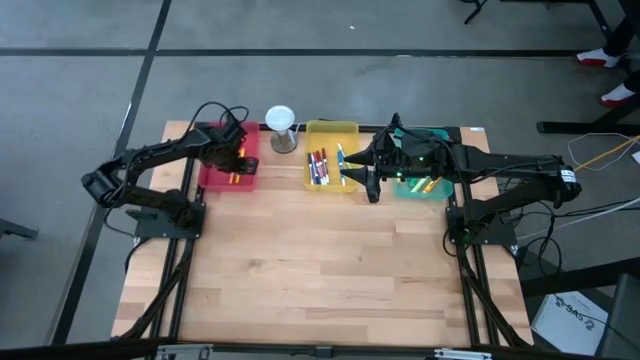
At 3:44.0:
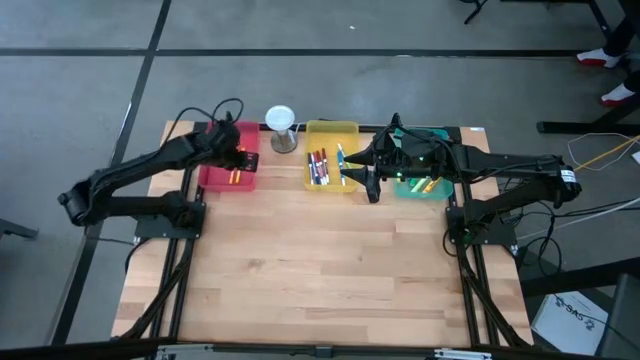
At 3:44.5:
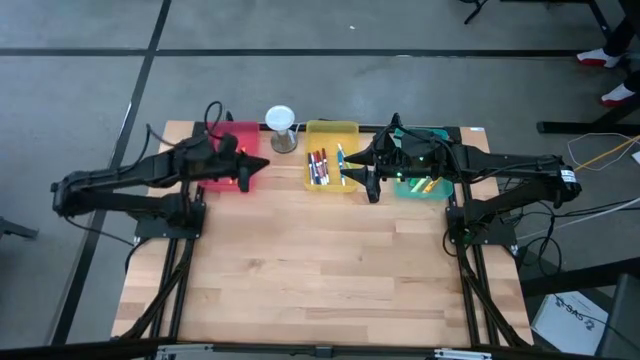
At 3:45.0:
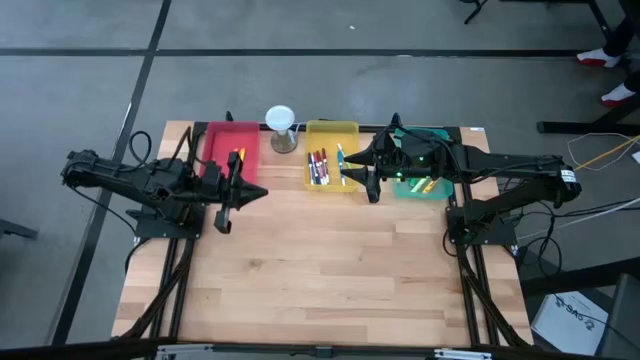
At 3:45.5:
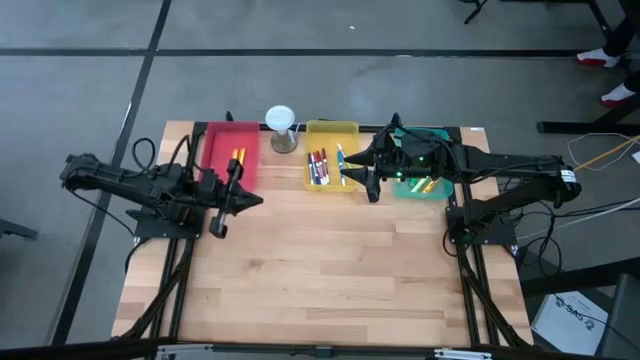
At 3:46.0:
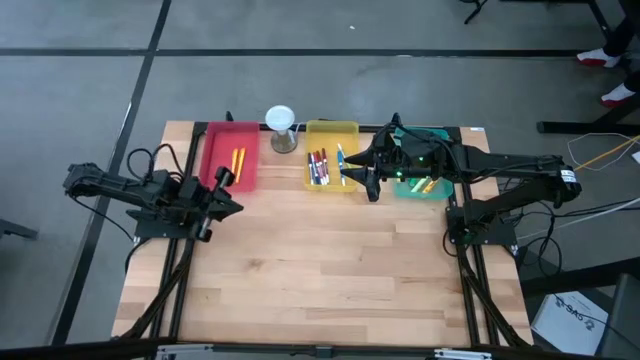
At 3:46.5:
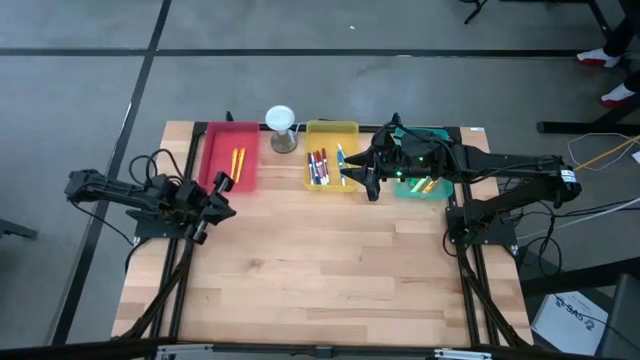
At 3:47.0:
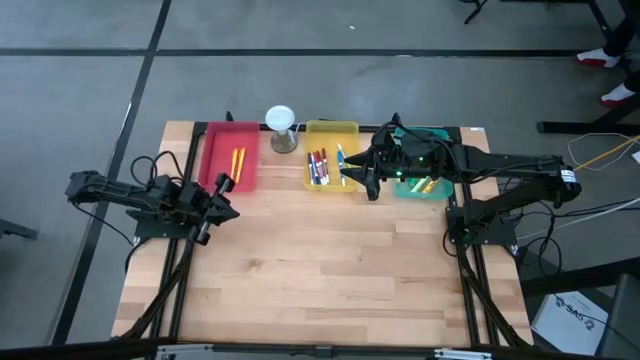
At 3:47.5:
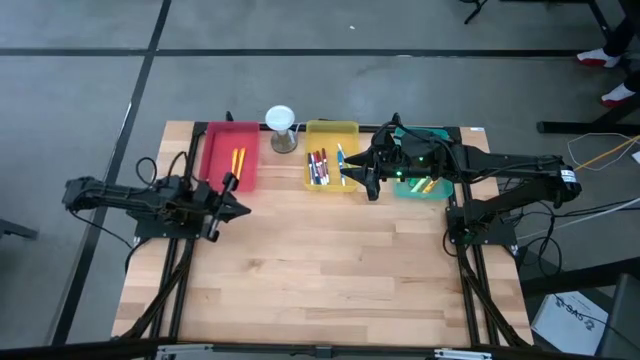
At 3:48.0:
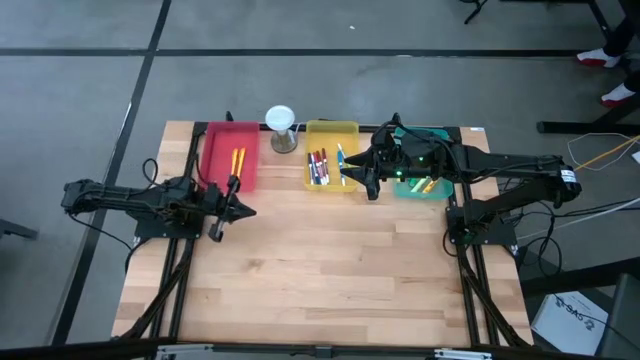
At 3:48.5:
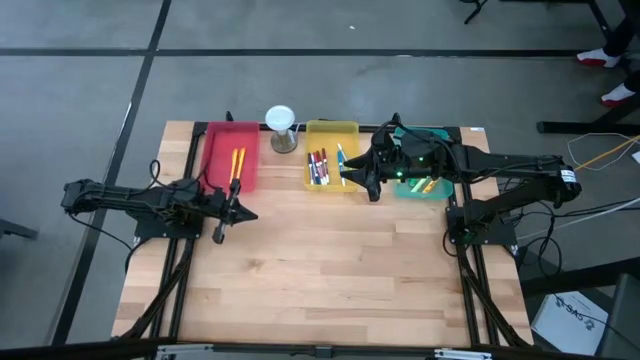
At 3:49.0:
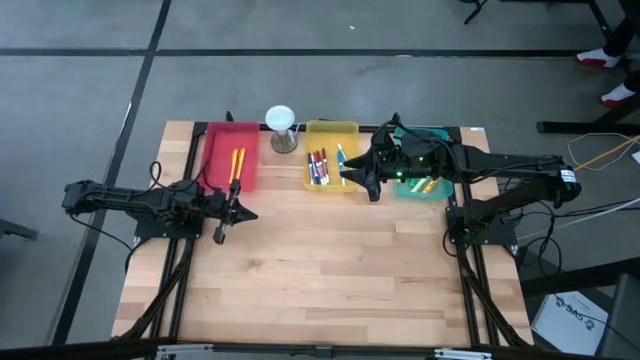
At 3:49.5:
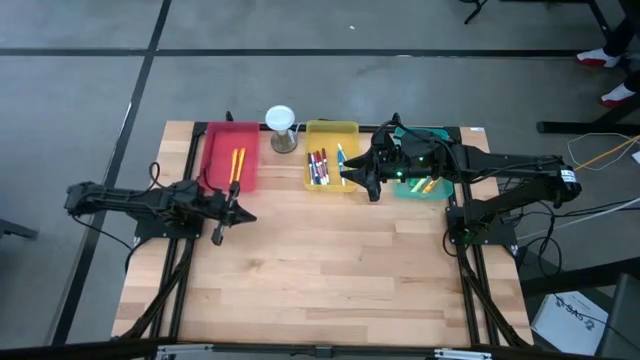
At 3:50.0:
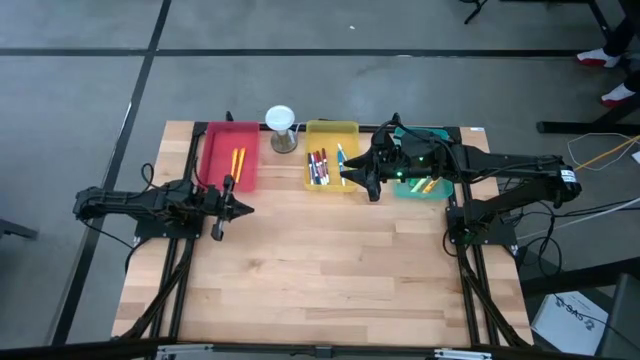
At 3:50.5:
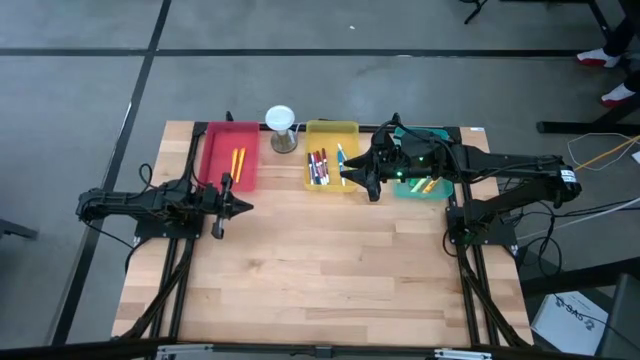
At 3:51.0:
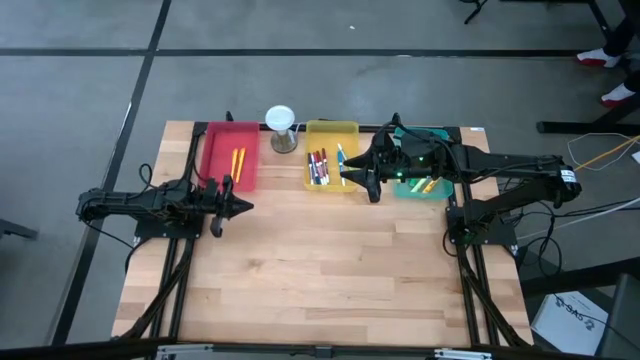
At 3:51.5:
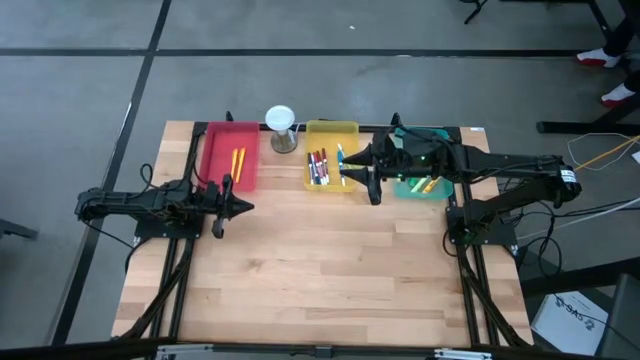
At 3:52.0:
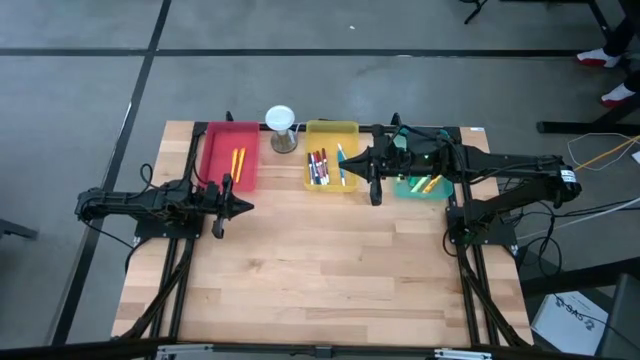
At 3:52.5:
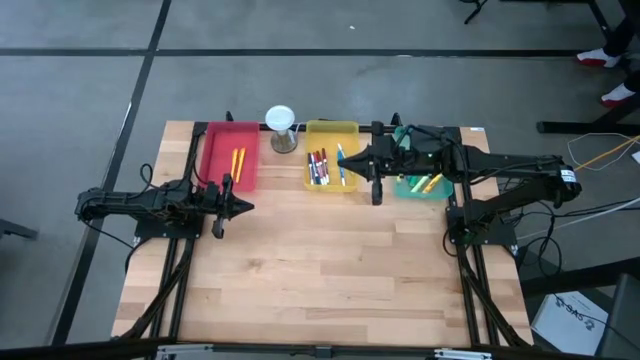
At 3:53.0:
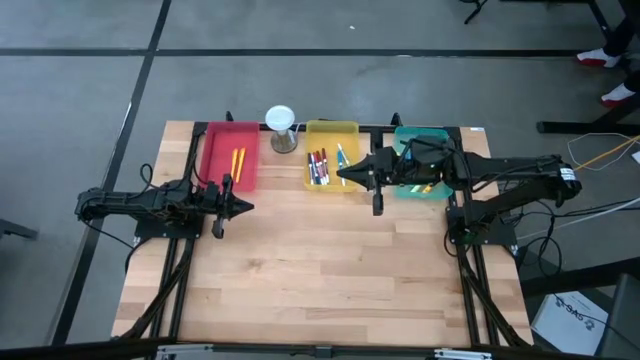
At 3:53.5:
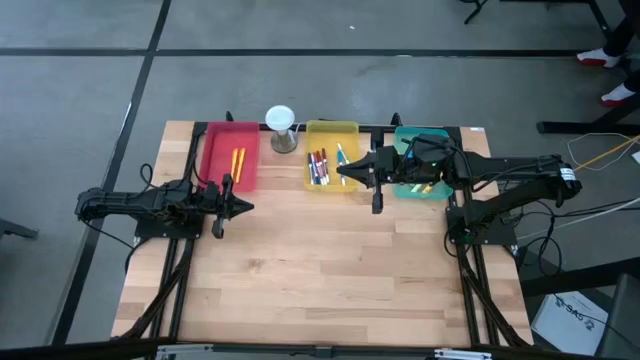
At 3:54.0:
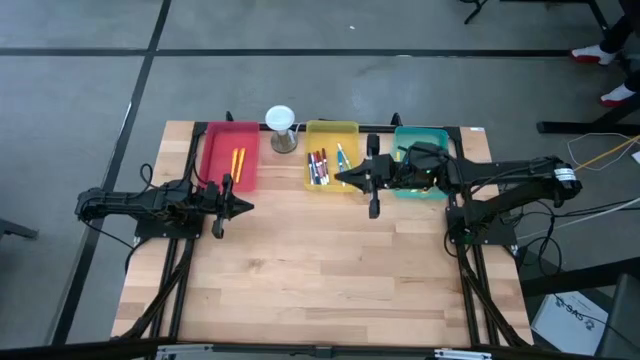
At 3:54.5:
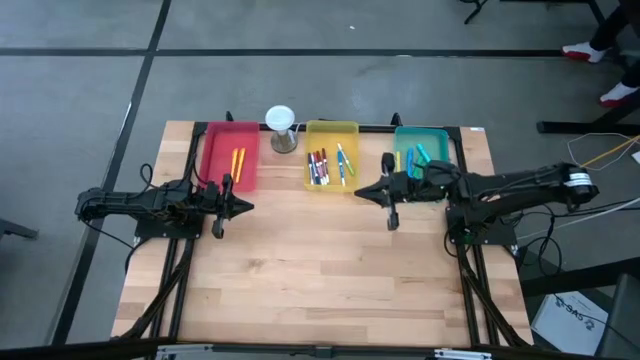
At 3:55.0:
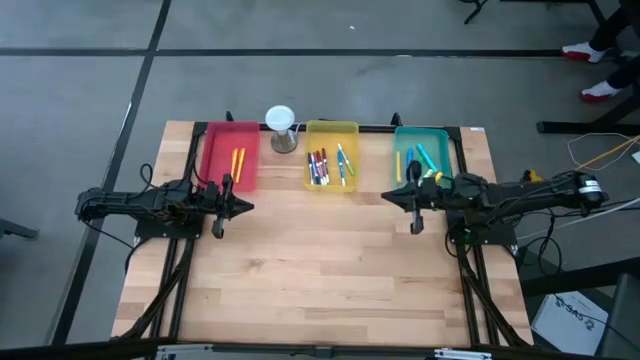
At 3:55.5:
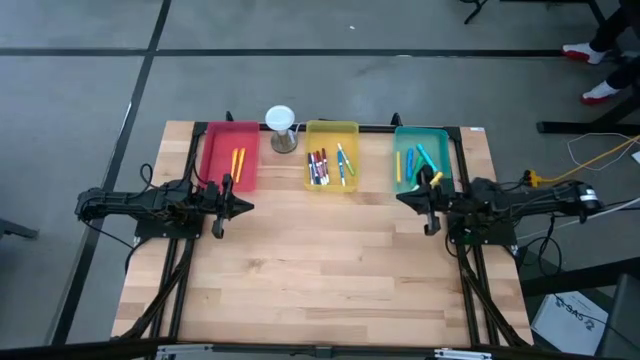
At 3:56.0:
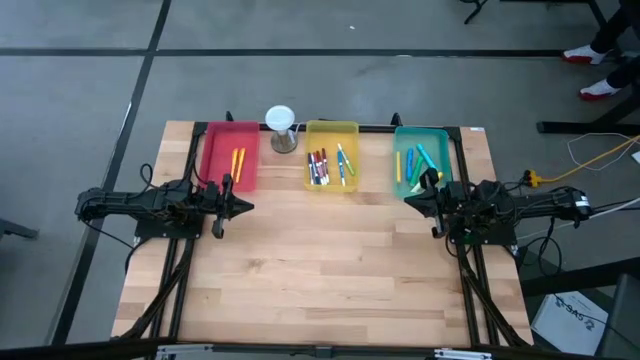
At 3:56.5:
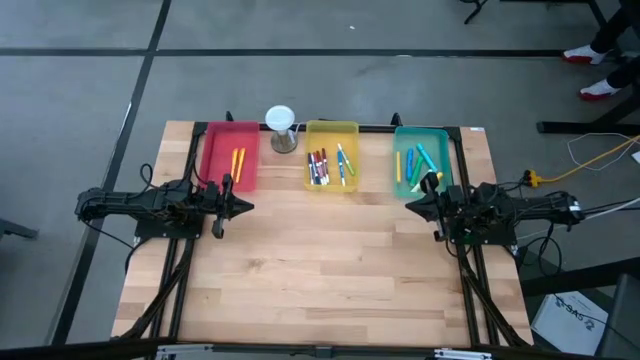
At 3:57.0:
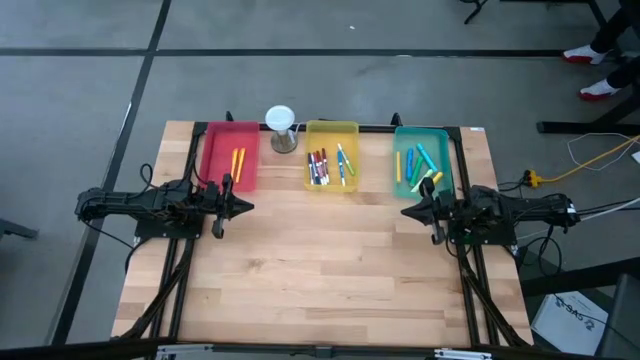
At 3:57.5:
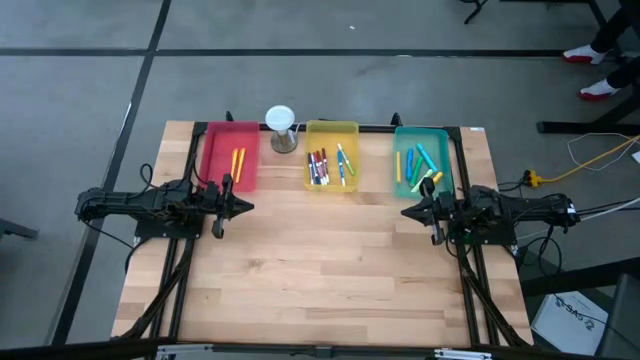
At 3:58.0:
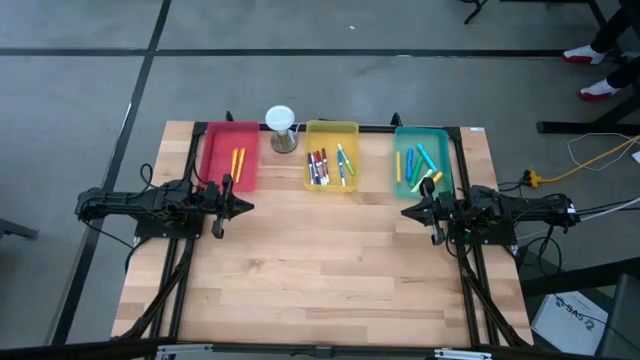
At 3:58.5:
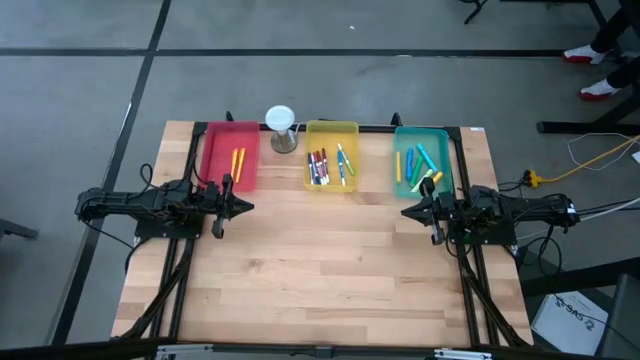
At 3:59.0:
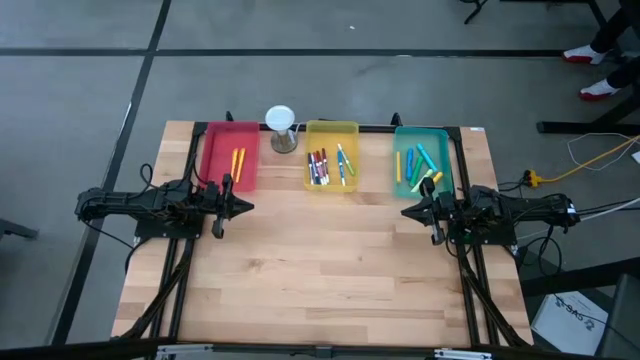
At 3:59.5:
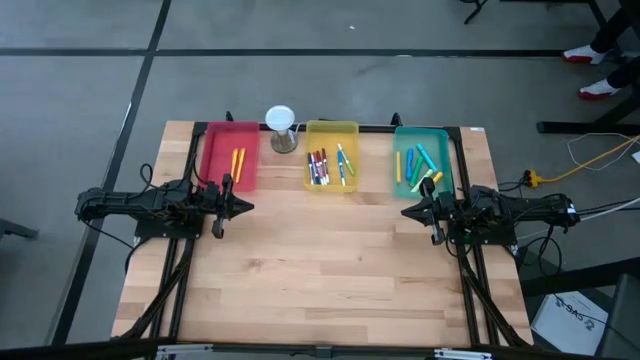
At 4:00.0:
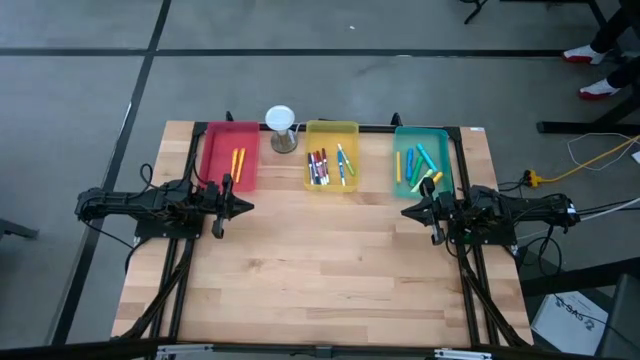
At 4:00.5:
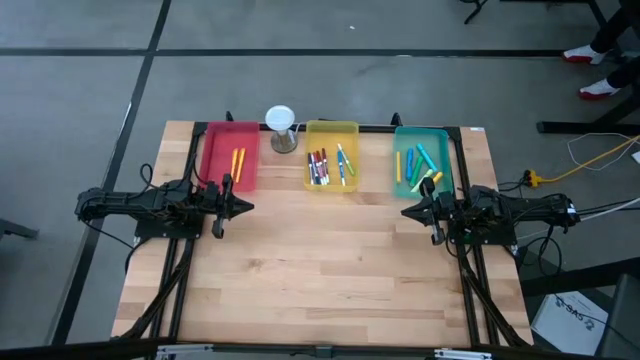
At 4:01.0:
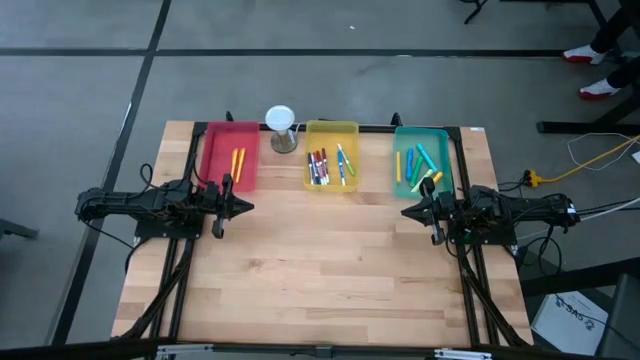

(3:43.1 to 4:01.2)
Task: Pick & Place Markers
Return to Home Position

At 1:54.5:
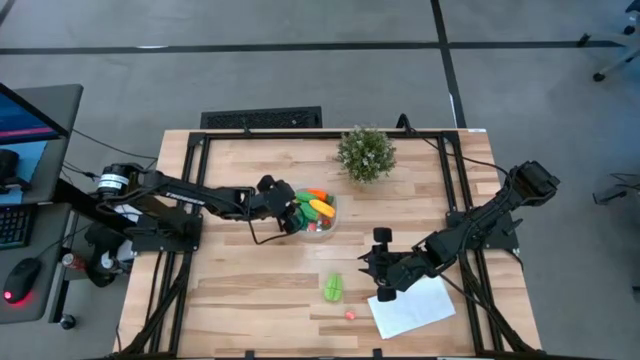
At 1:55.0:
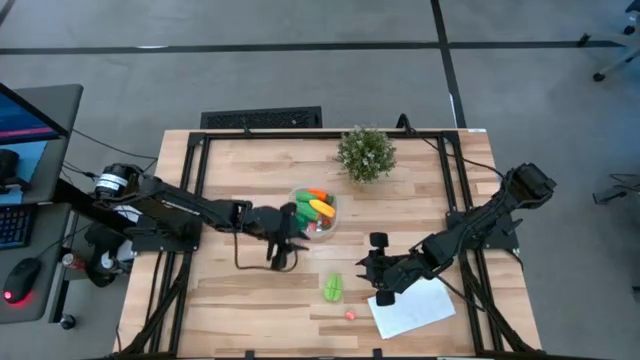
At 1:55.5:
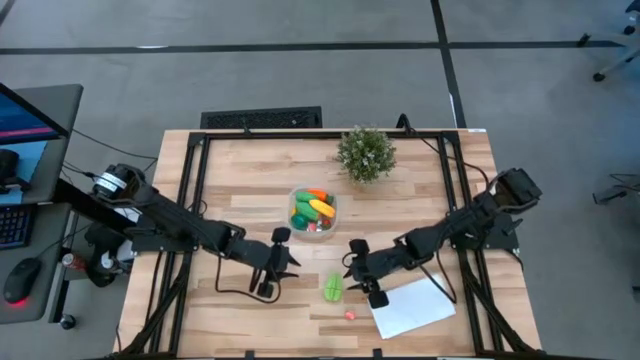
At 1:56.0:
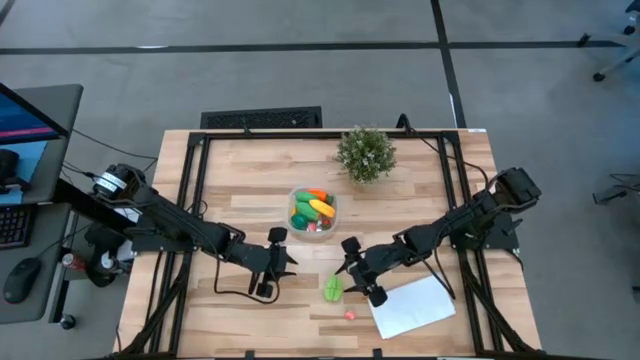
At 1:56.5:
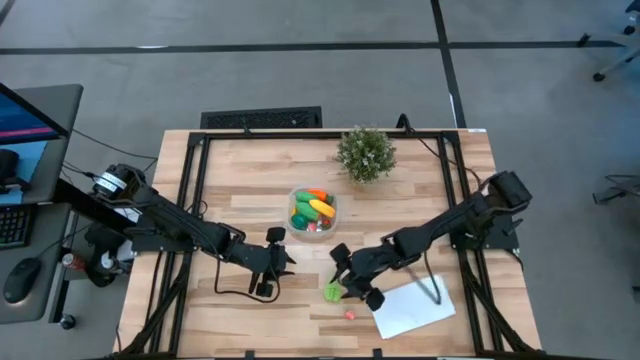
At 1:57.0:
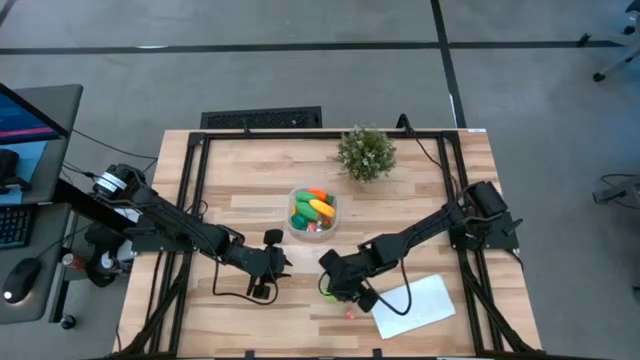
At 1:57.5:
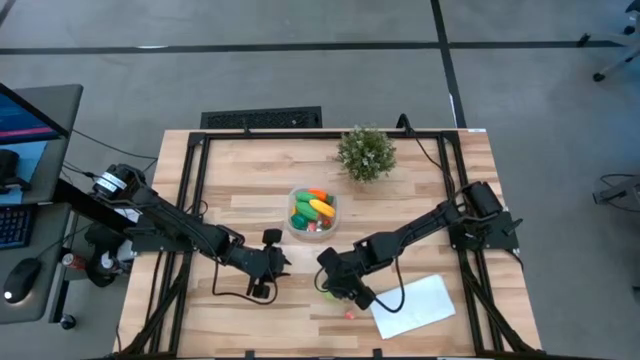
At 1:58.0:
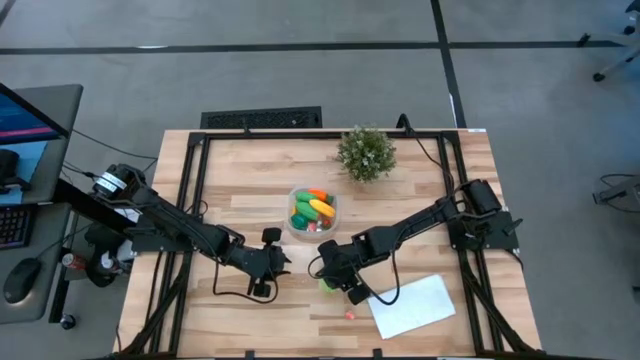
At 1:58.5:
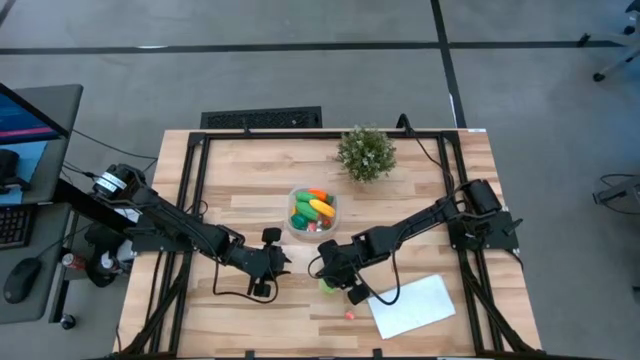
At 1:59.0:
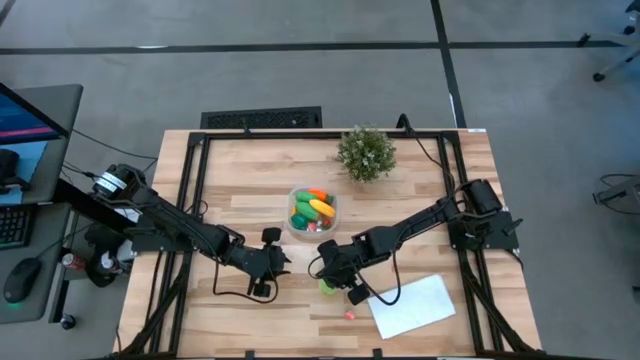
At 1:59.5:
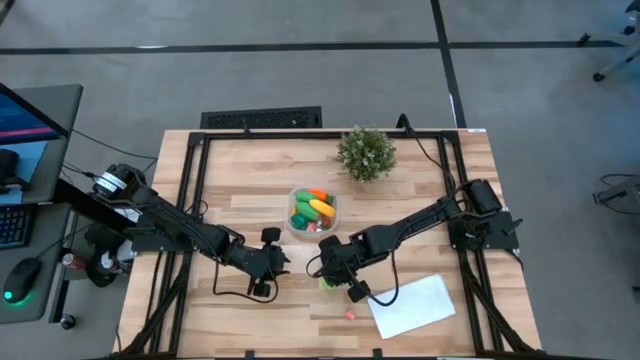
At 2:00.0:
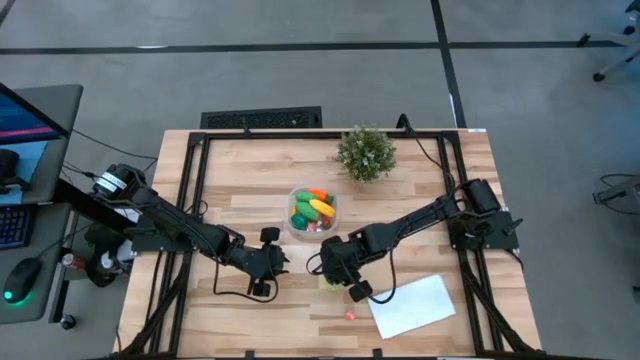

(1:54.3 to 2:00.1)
Task: Pick and placing Produce into tupperware
Put the green starfruit into the transparent container
